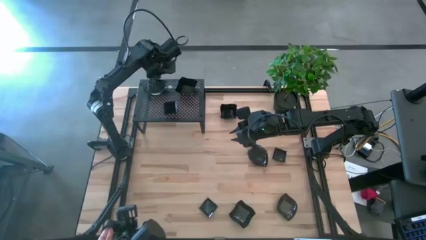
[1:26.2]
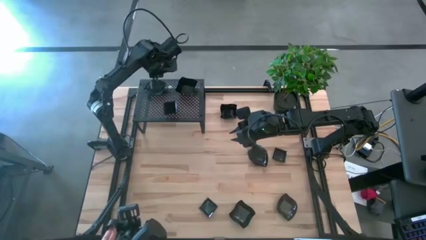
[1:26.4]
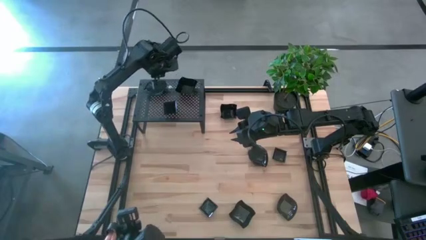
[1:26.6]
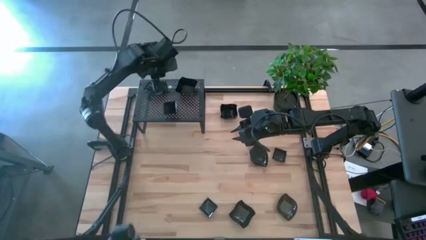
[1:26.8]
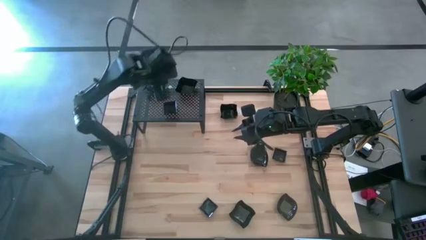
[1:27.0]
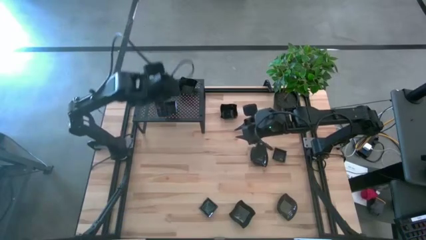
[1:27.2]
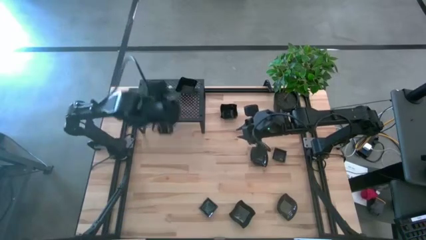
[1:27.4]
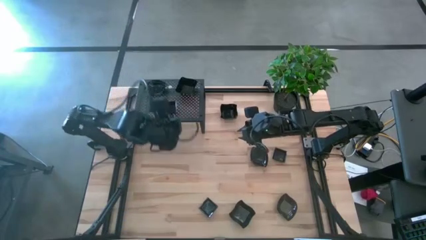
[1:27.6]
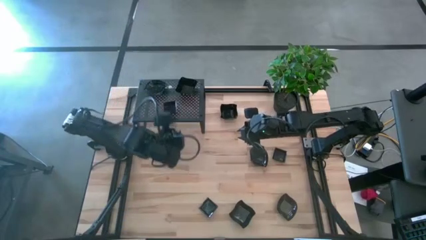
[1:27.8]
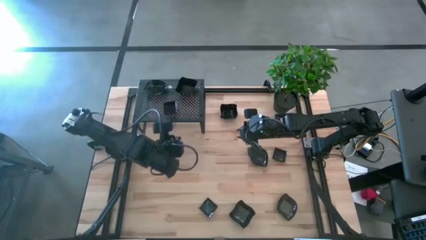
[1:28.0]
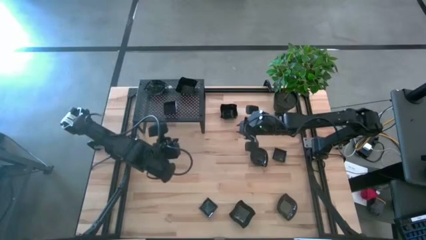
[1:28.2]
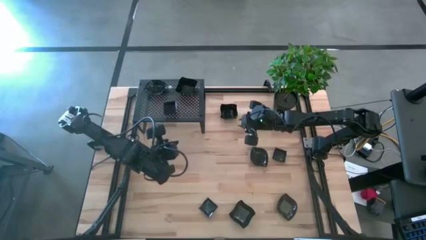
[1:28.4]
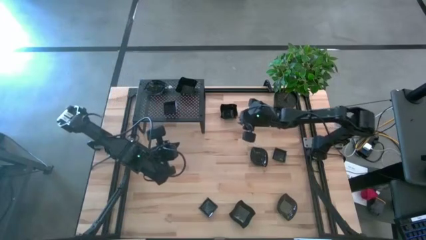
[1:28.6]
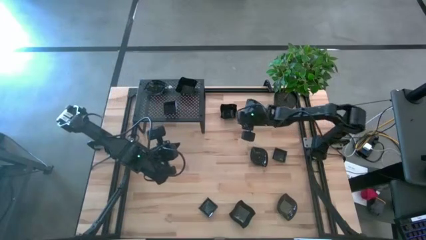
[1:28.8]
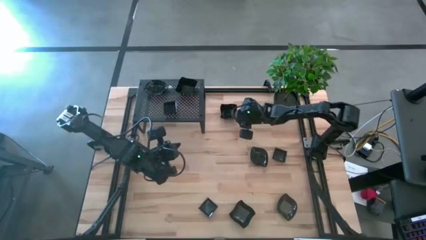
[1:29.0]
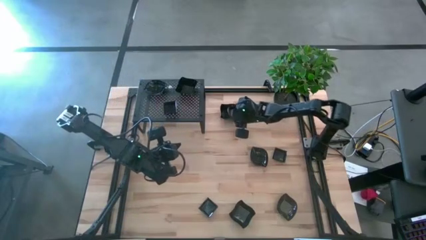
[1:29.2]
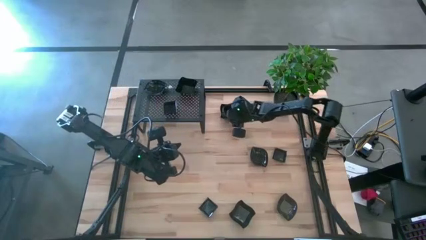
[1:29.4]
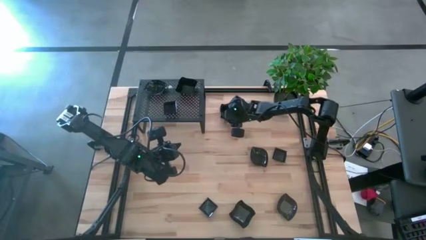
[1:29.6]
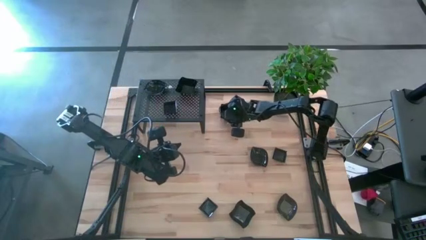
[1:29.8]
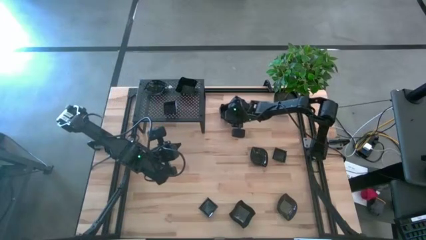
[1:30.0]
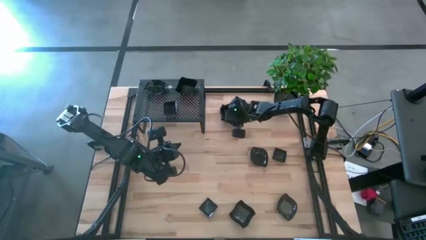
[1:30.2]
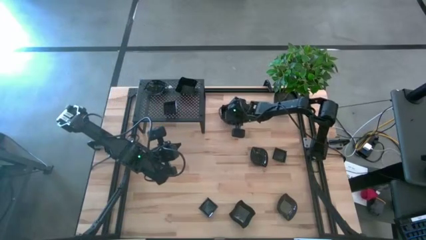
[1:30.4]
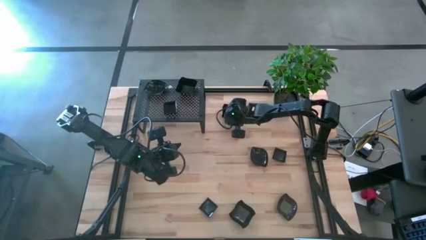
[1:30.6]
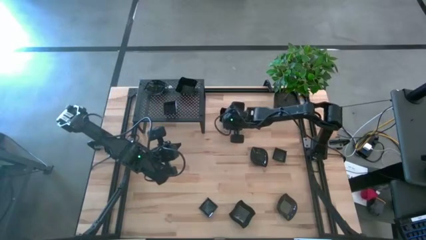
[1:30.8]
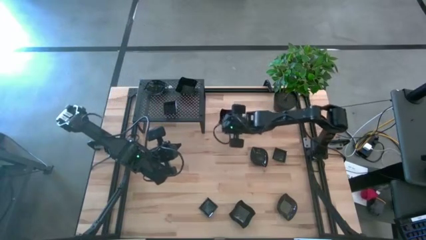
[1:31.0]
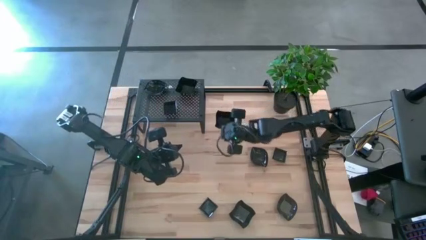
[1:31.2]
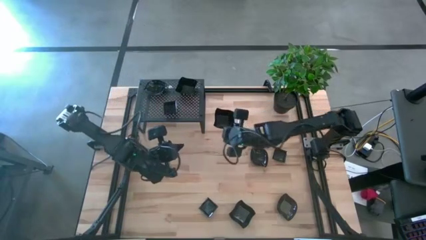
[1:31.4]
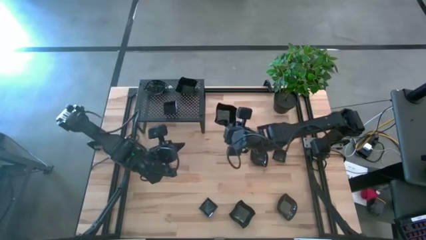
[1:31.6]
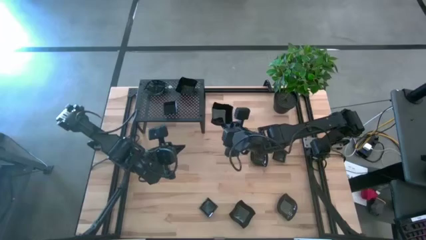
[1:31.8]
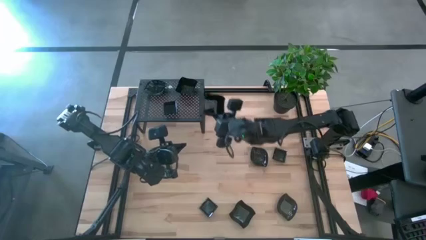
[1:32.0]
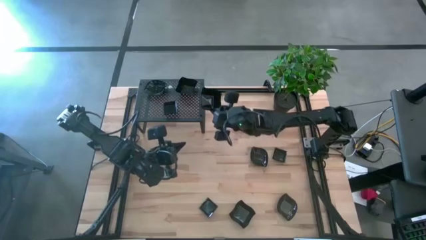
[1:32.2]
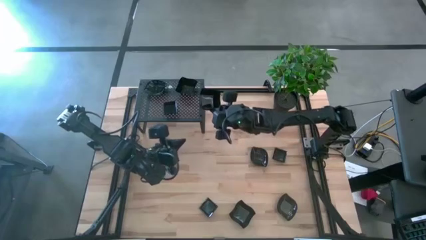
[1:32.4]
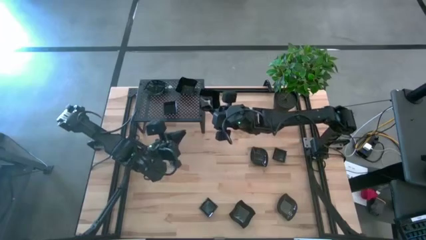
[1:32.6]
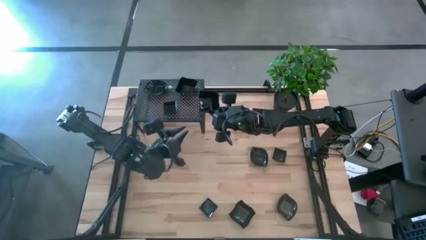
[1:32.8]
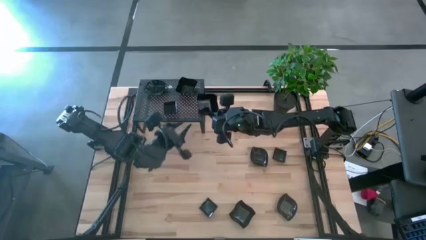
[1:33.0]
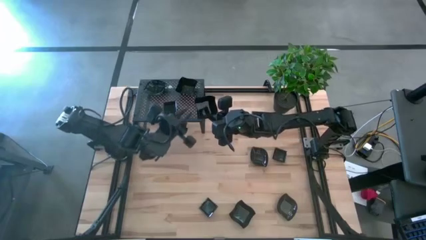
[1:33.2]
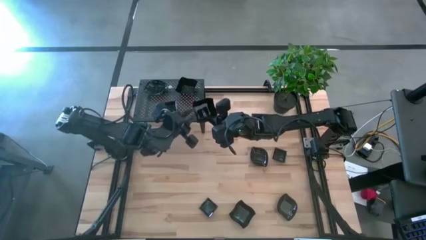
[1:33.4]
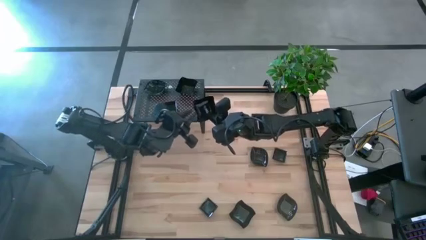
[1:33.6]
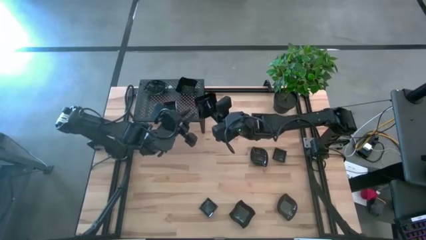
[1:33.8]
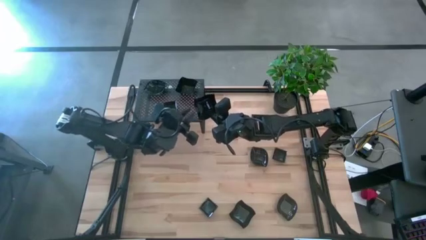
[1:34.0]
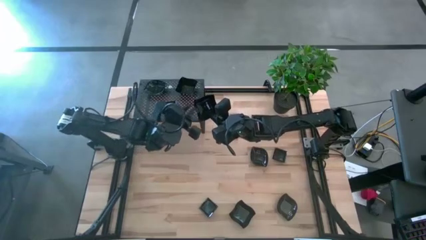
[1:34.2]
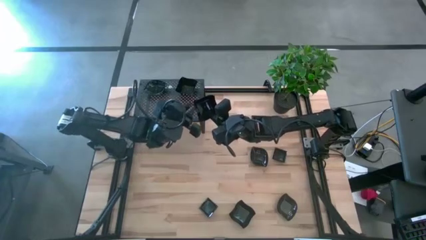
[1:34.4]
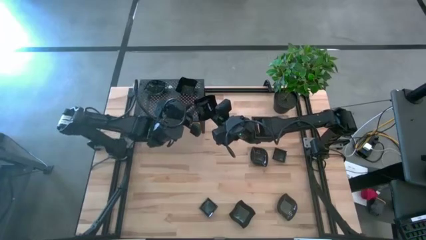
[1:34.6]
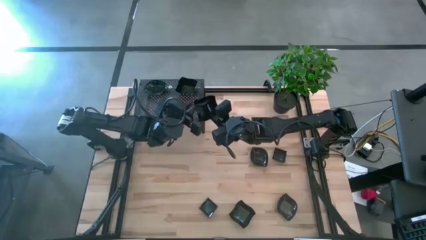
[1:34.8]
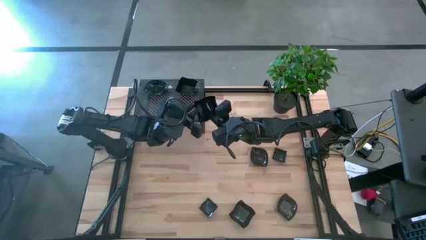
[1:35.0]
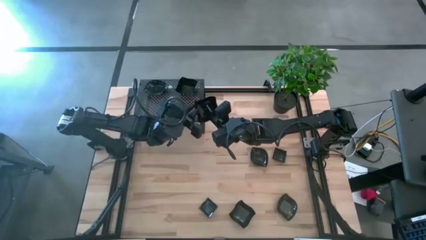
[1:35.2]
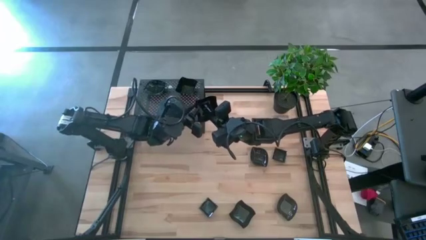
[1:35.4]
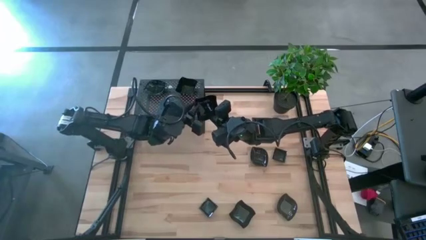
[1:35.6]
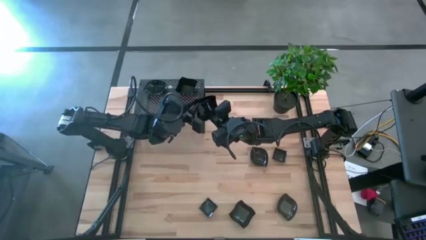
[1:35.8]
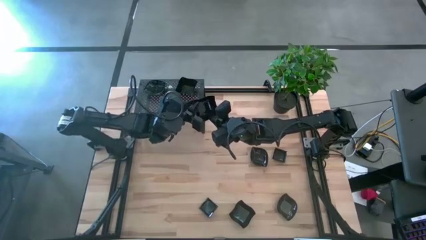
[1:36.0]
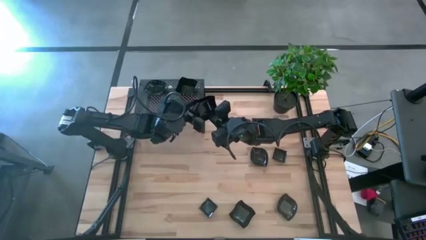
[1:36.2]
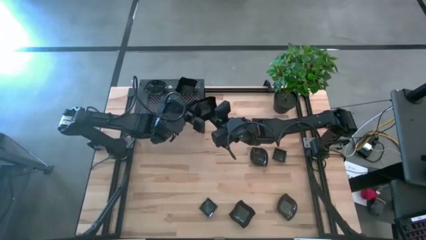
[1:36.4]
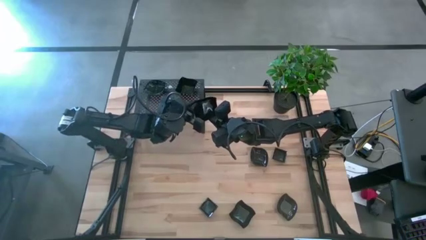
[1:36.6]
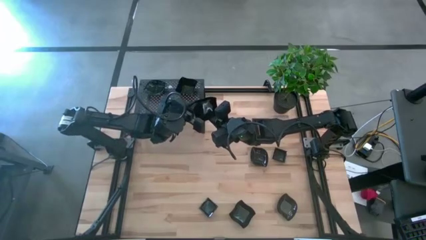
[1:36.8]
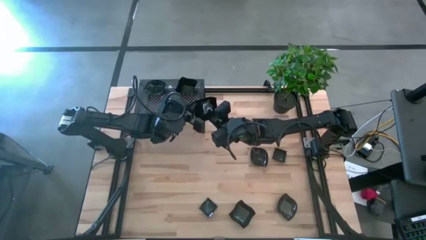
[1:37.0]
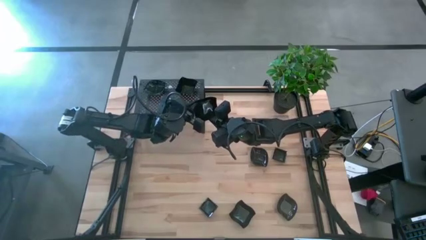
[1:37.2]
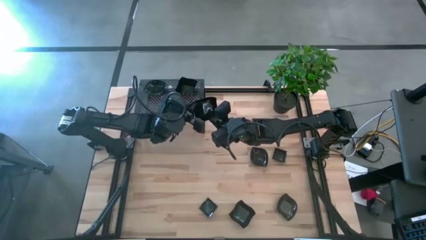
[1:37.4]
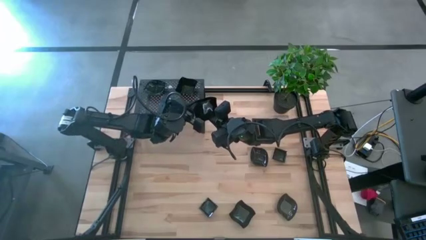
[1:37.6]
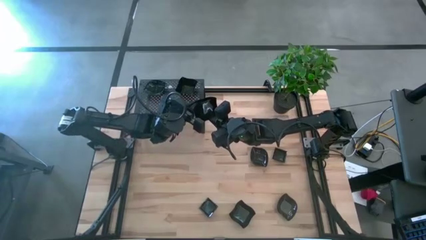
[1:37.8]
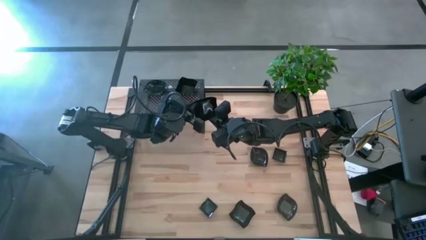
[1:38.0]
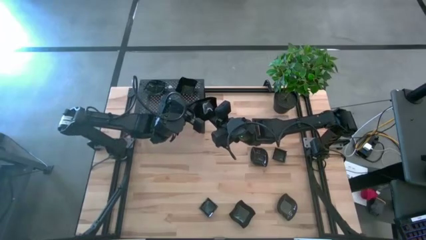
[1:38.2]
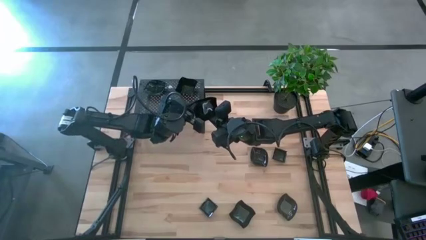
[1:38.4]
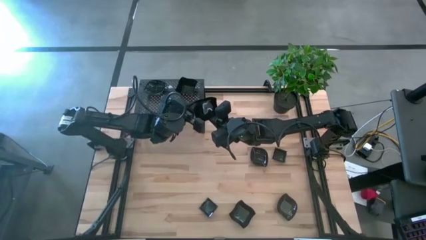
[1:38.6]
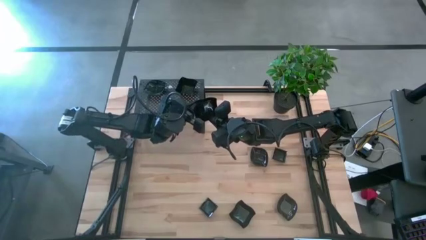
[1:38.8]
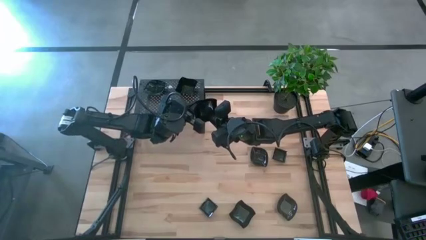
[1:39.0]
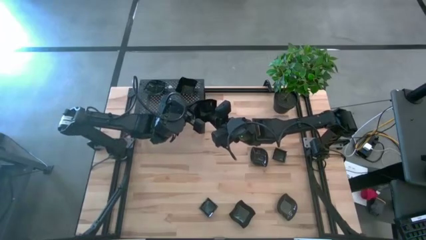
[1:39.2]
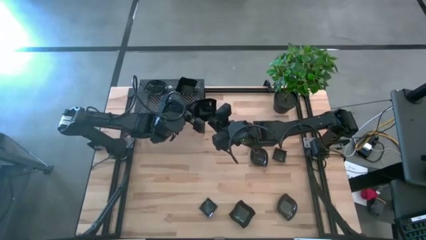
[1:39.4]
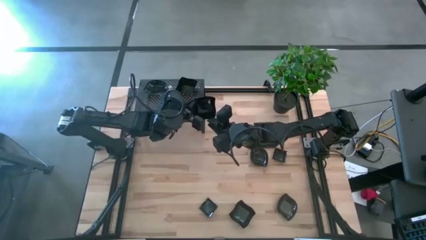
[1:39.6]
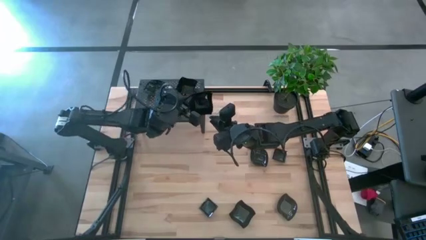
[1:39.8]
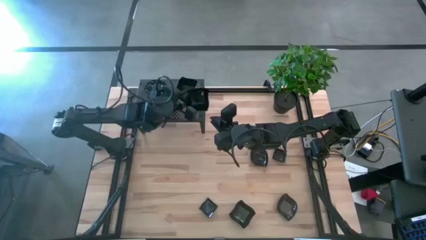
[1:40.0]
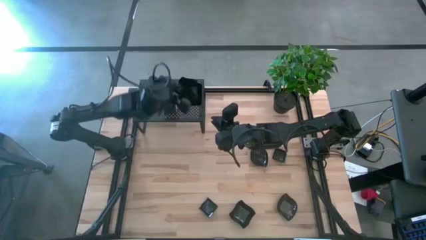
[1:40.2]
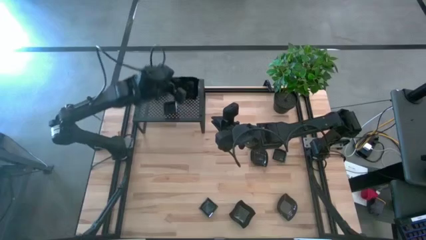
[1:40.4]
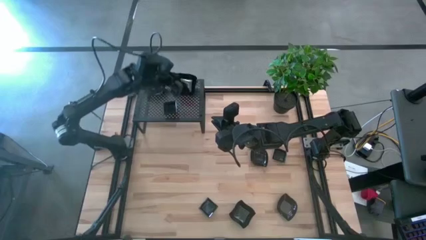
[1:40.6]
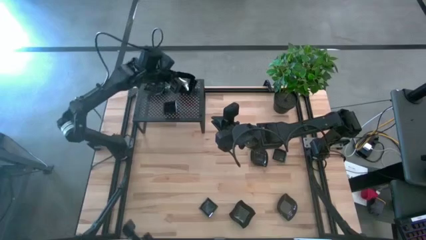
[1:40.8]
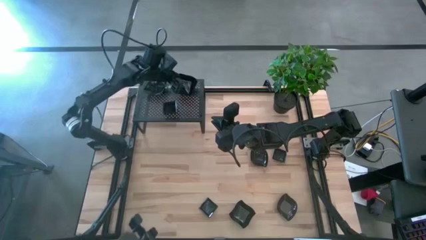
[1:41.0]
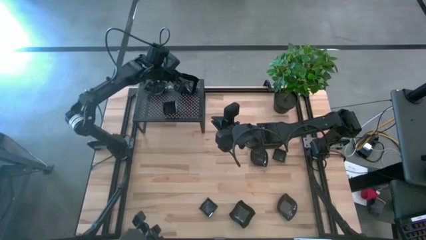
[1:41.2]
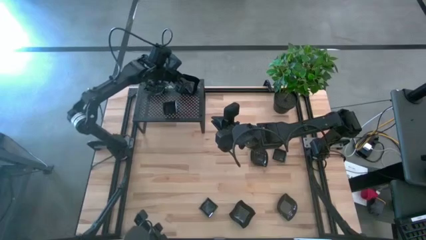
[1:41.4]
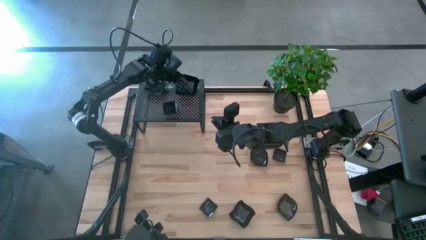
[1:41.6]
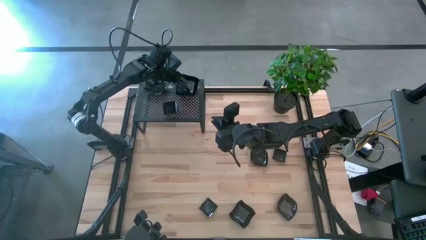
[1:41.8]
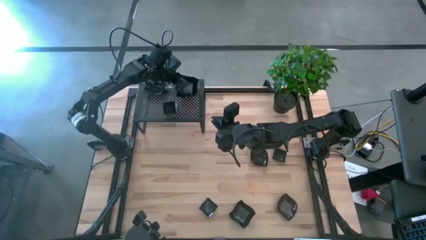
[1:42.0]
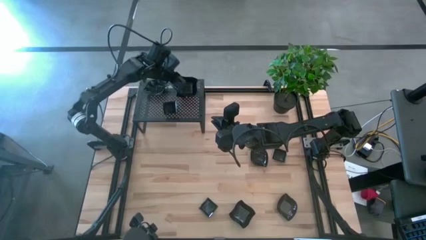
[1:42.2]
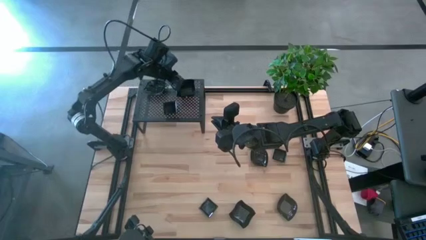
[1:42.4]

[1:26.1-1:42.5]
Task: Pick & Place Mini shaped plates
Stack the distorted square plate on top of the stacked distorted square plate on the shelf
